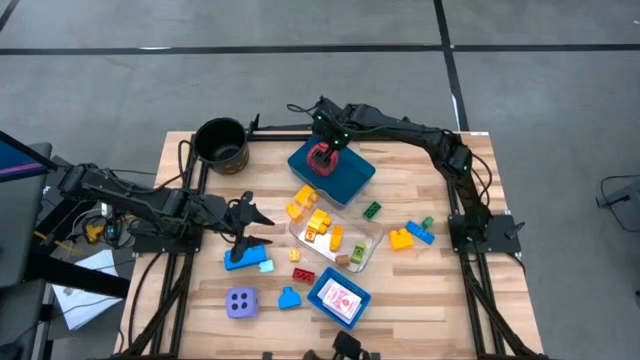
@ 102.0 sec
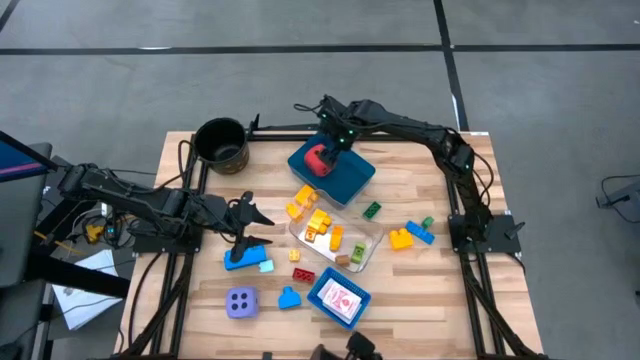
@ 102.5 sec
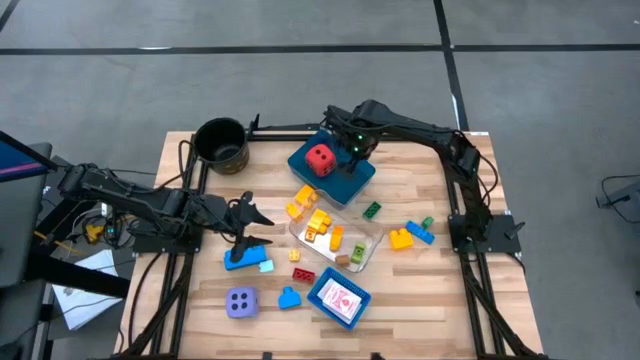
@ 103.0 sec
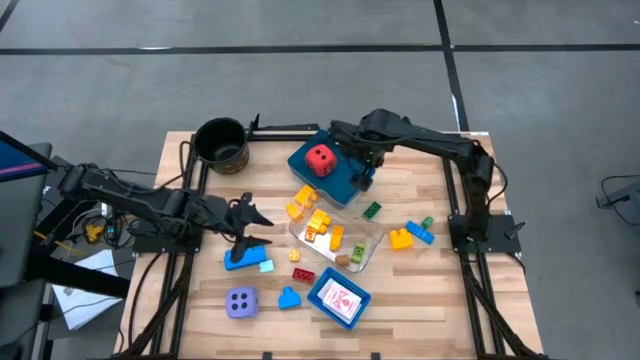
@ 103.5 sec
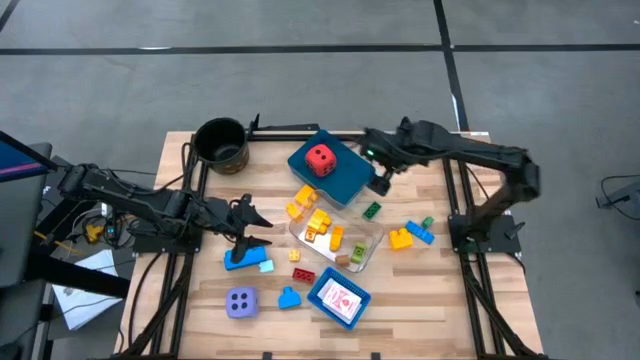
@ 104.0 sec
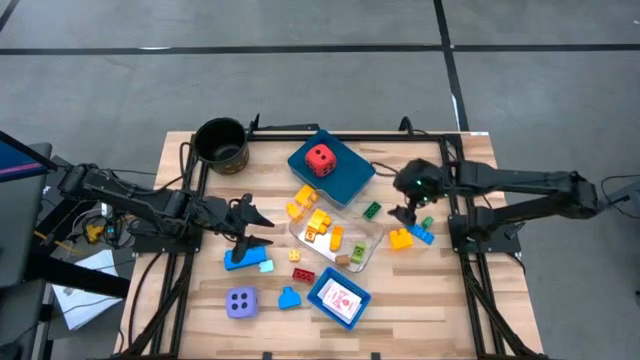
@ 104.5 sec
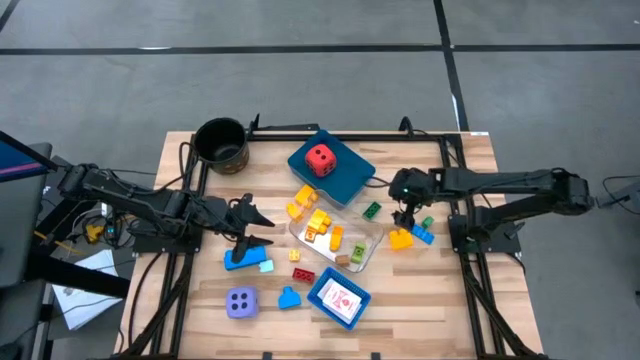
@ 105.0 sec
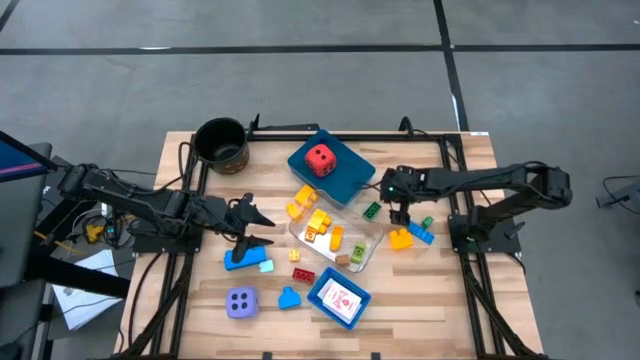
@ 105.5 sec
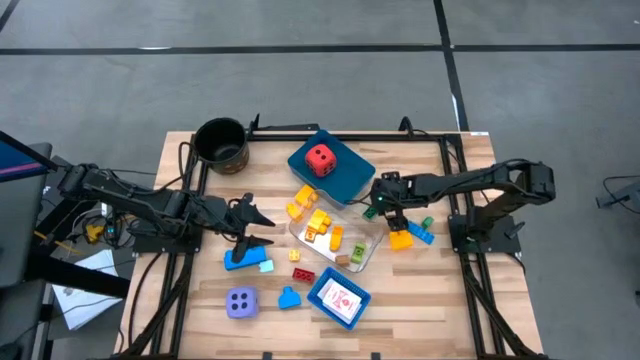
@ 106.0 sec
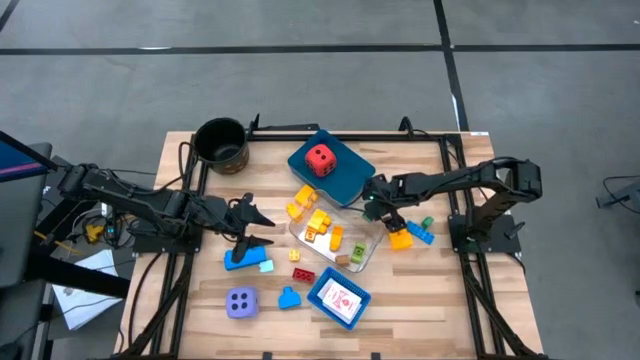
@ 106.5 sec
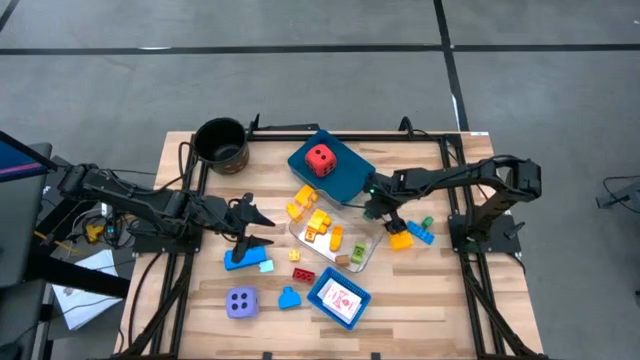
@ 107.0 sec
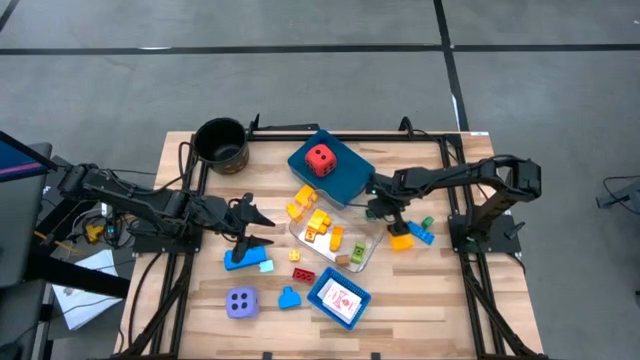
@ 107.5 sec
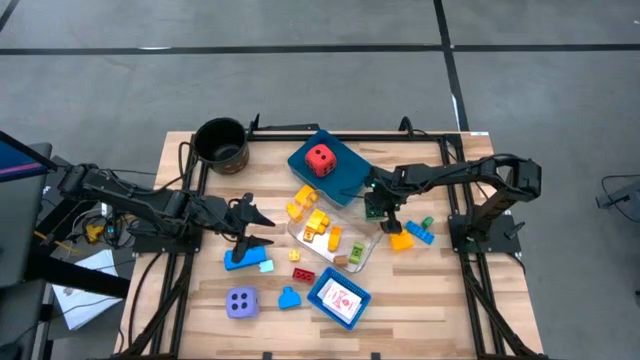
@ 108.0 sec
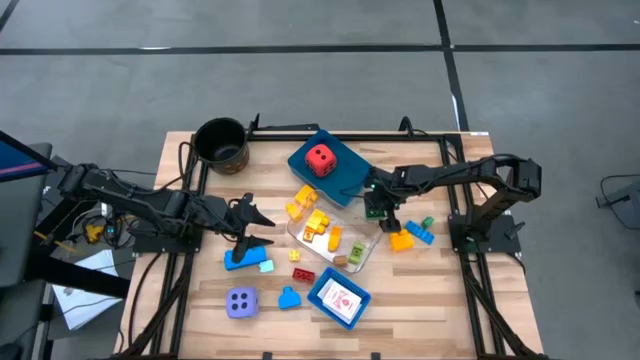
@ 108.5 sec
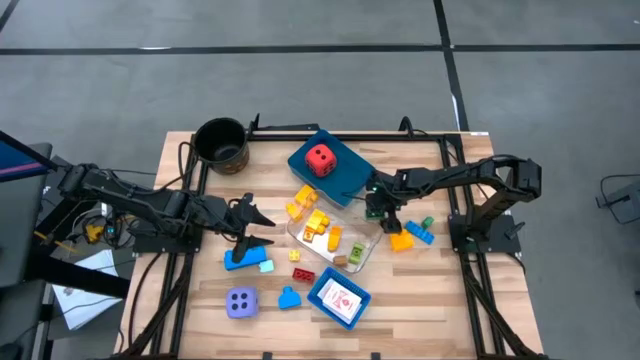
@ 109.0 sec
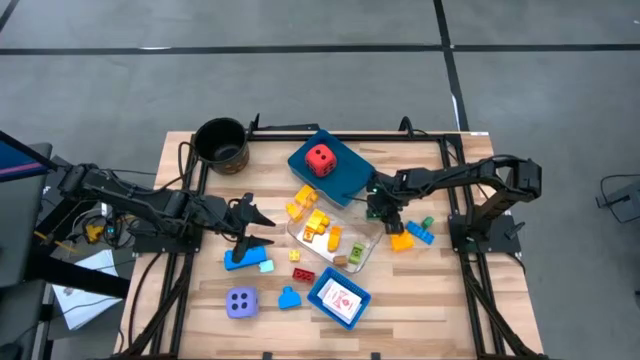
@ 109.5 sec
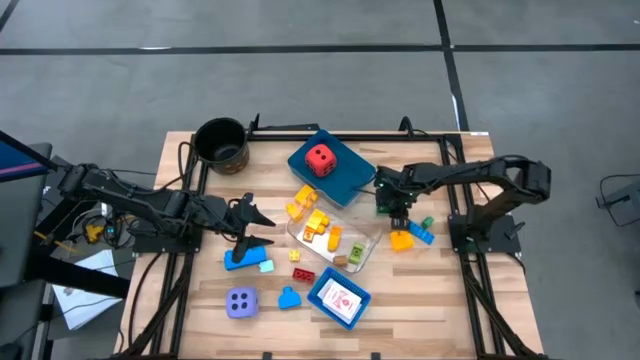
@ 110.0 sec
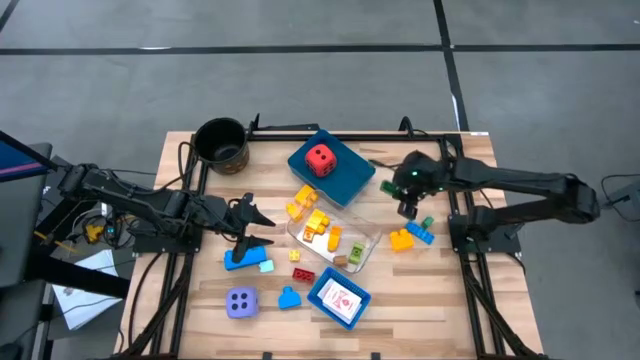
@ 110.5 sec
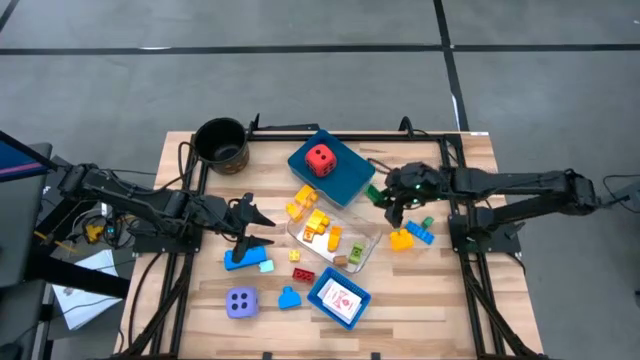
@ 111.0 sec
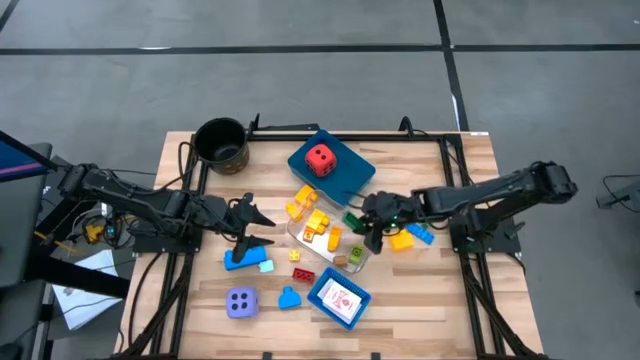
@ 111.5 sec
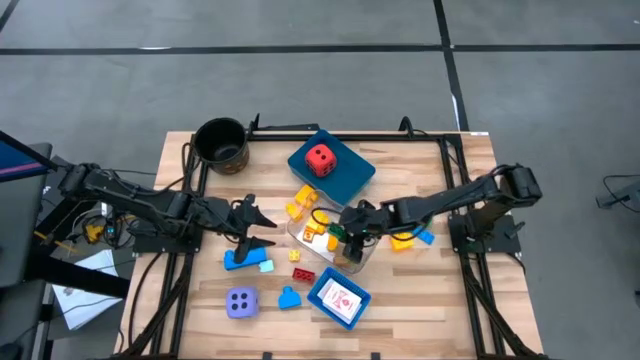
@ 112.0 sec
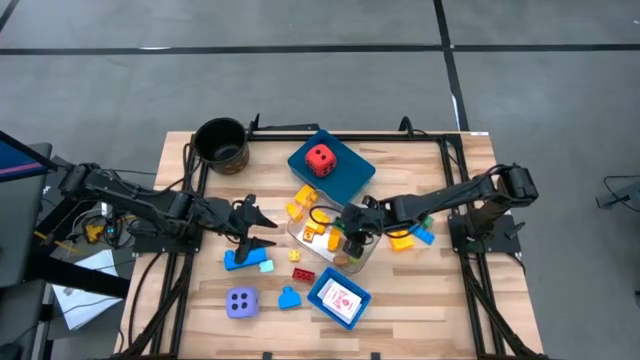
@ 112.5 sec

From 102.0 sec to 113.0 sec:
Task: Pick & Place Toys
Put the green game piece block into the transparent bin

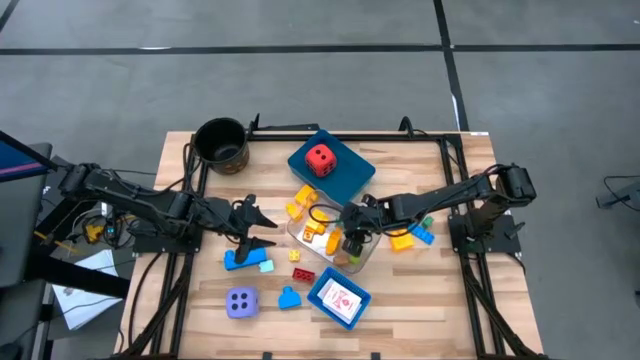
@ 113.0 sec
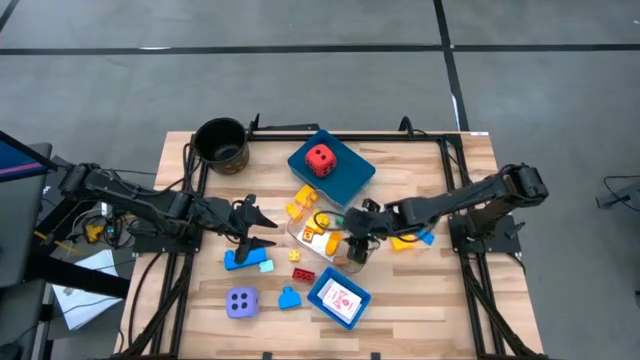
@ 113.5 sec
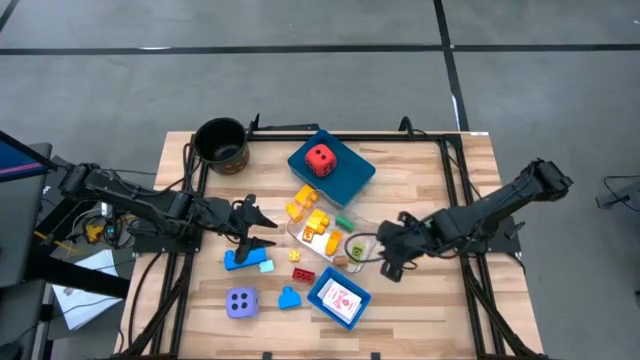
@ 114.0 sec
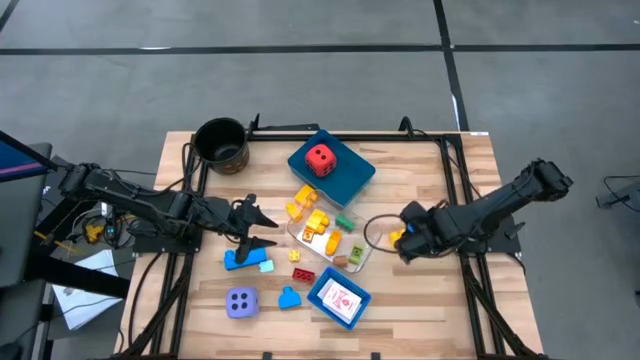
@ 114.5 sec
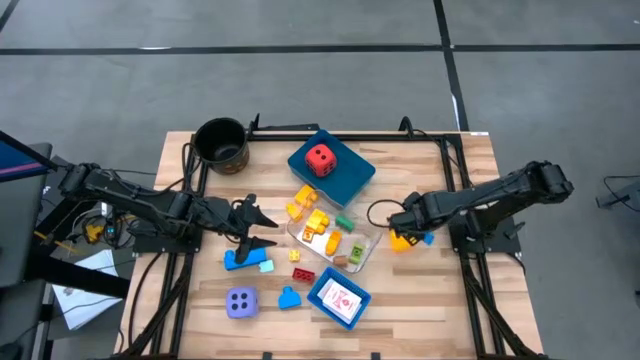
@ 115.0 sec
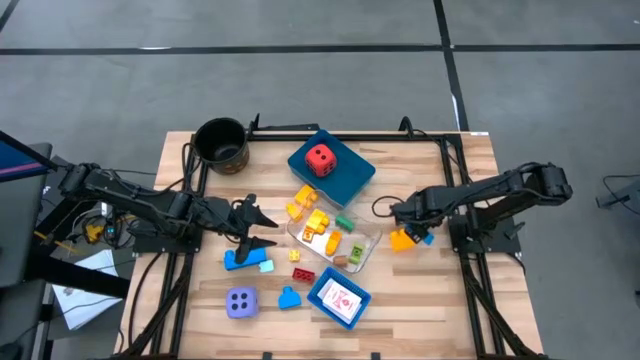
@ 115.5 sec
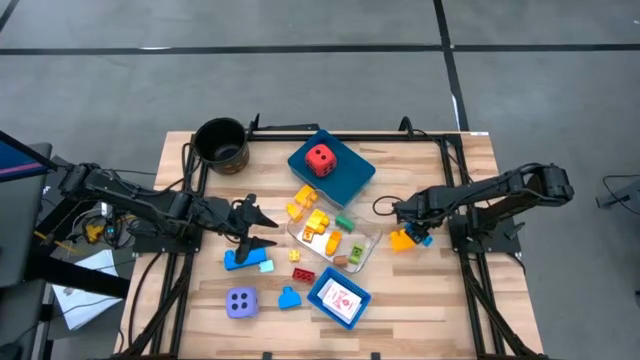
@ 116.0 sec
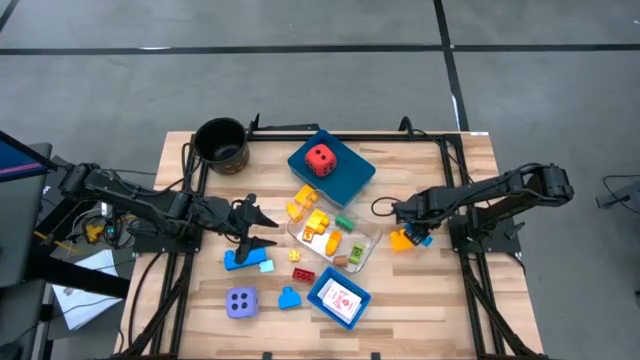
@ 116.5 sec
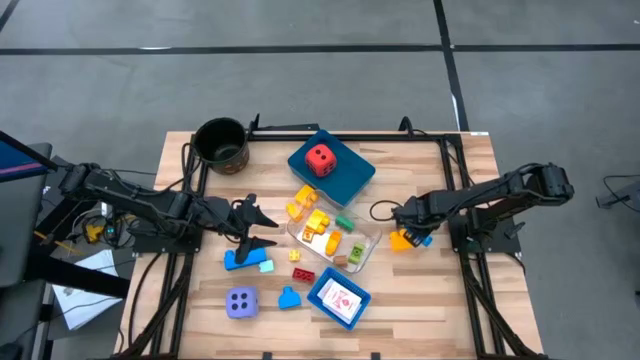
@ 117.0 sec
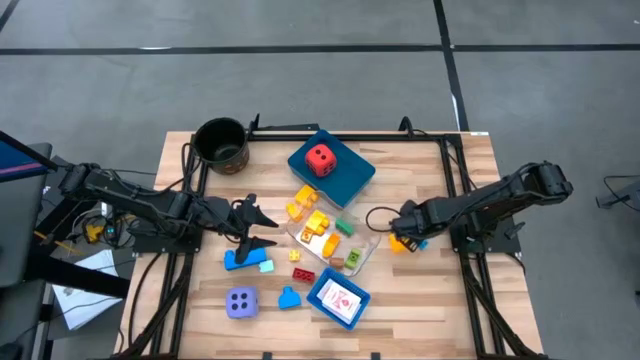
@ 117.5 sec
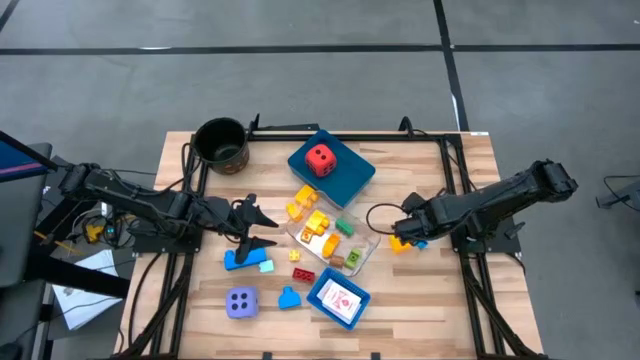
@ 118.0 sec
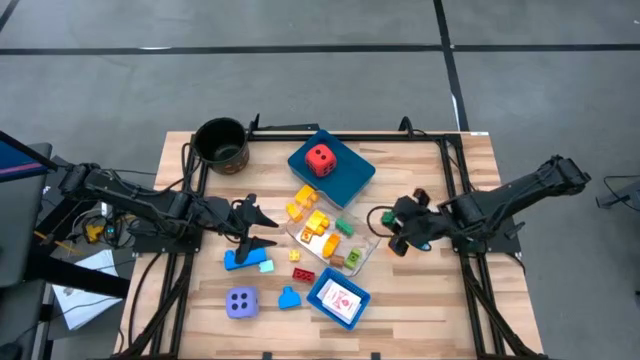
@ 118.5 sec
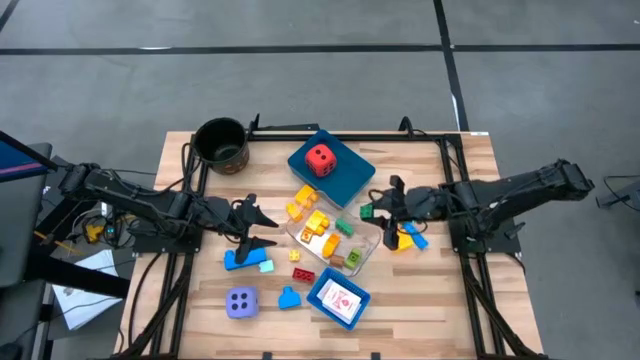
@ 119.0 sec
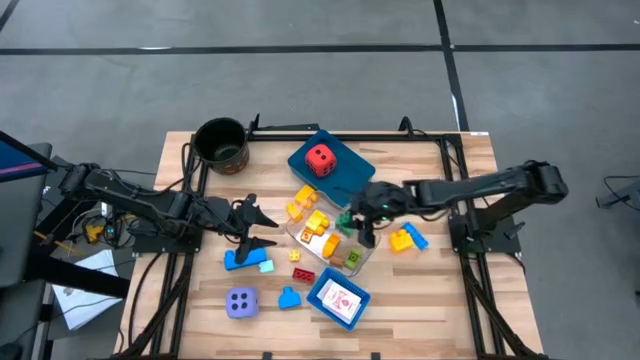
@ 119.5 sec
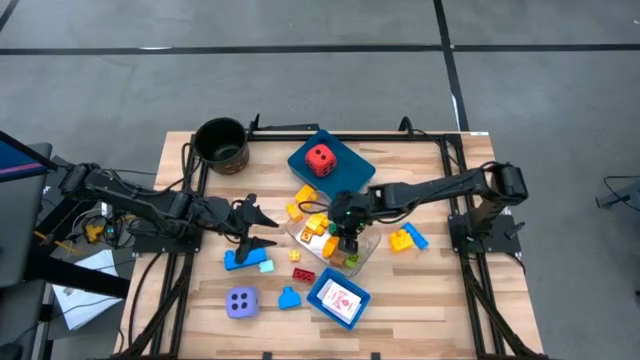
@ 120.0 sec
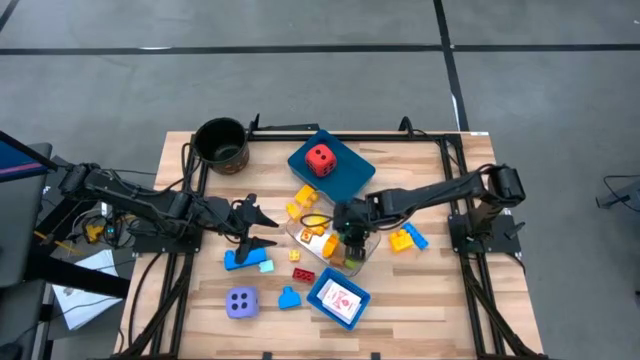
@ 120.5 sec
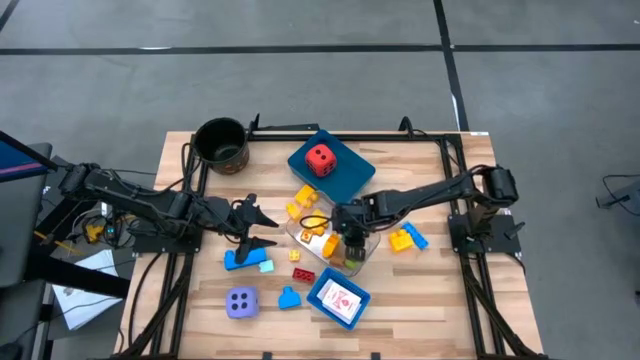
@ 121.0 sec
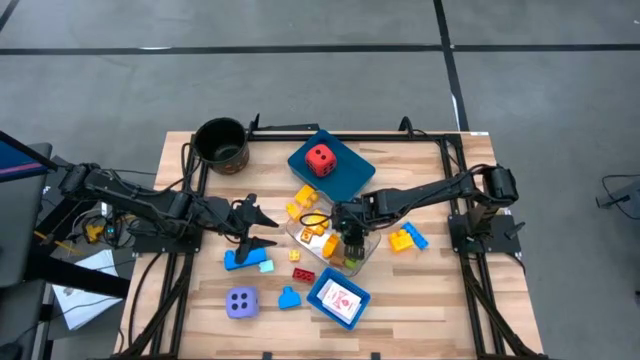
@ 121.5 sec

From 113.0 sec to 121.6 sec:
Put the green game piece block into the transparent bin

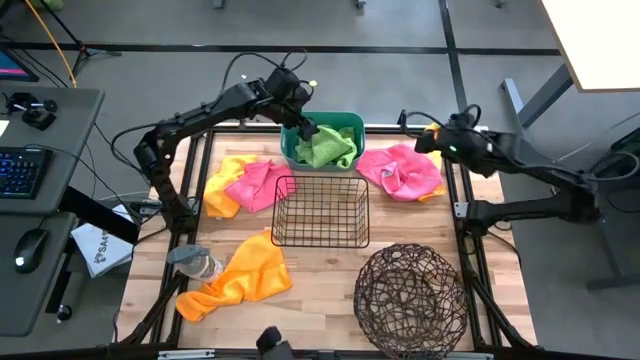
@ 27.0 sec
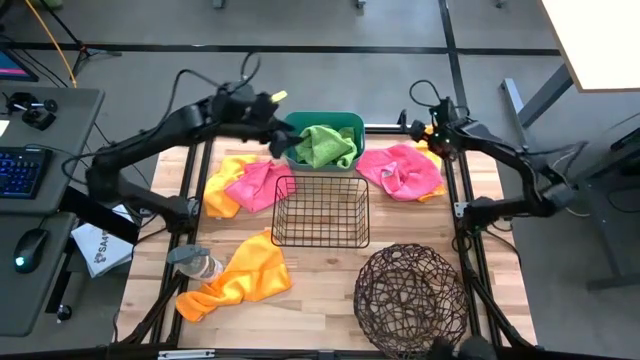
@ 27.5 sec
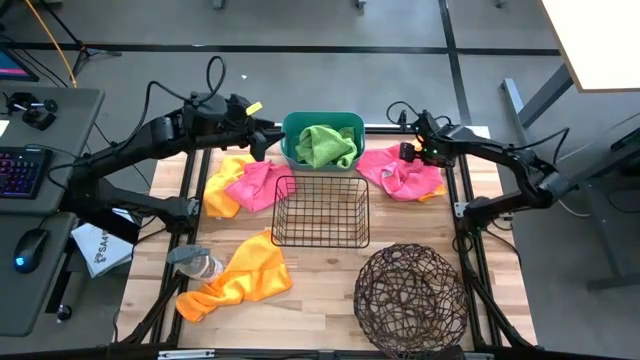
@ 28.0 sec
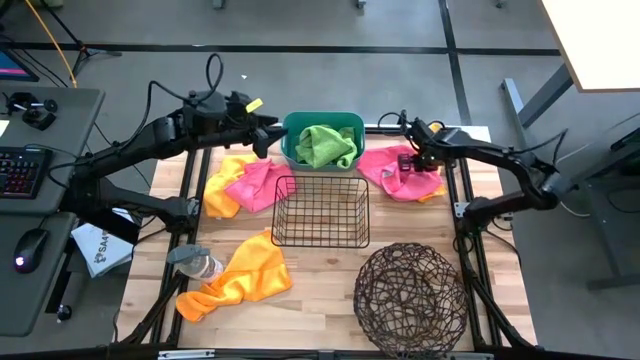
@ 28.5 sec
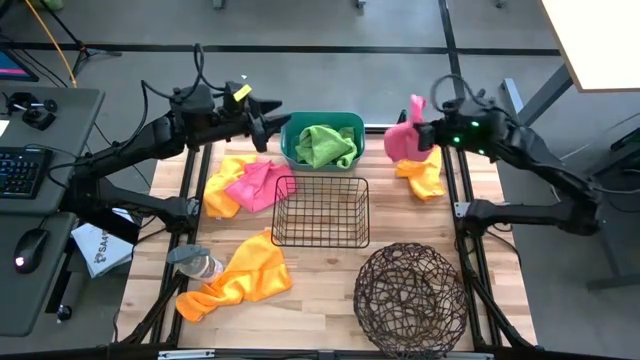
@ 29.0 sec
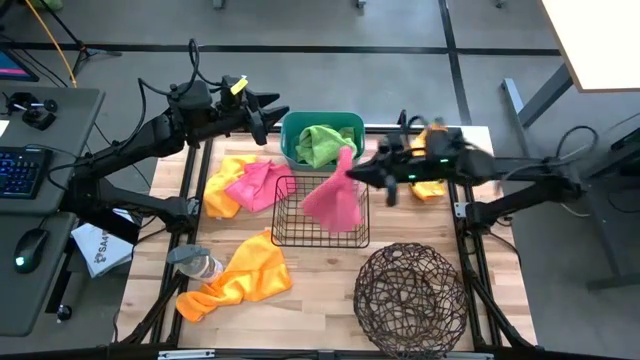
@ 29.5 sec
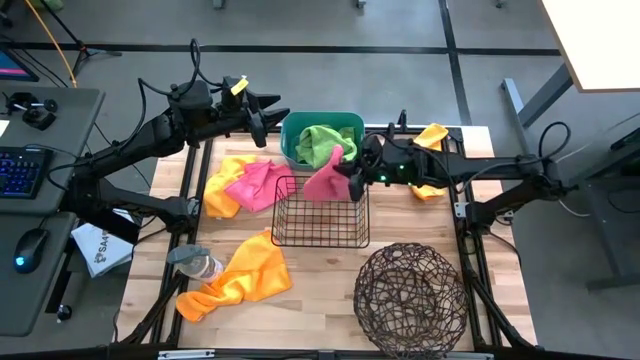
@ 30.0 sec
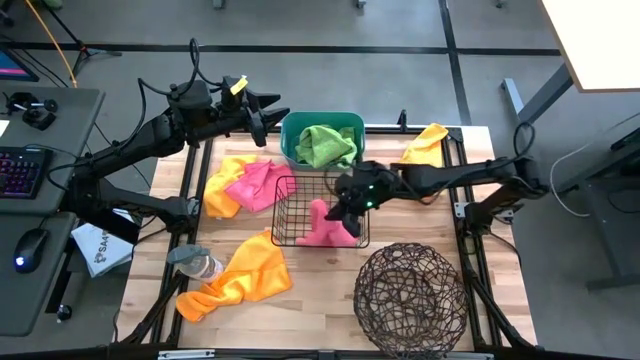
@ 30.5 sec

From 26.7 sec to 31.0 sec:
Task: Sort microfiber towel by color & place in baskets
Put the right pink microfiber cloth into the wire basket
